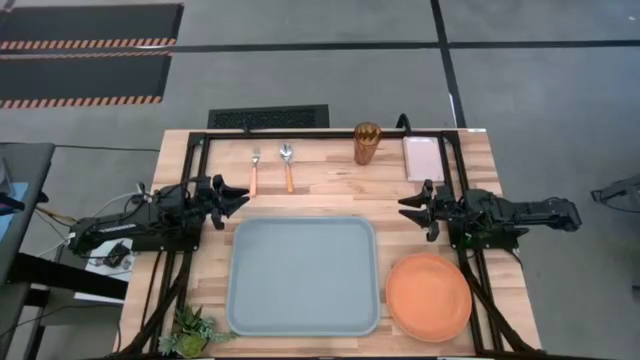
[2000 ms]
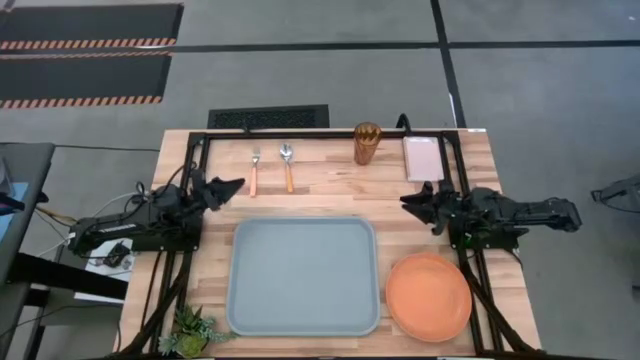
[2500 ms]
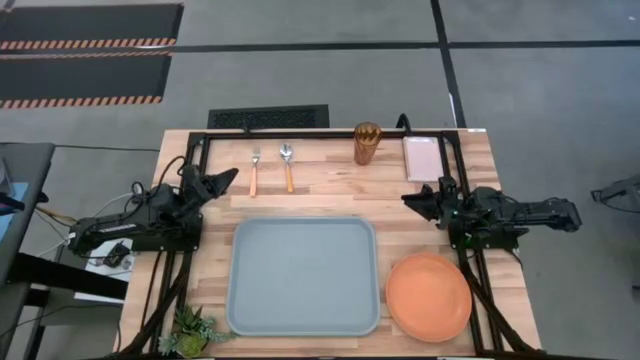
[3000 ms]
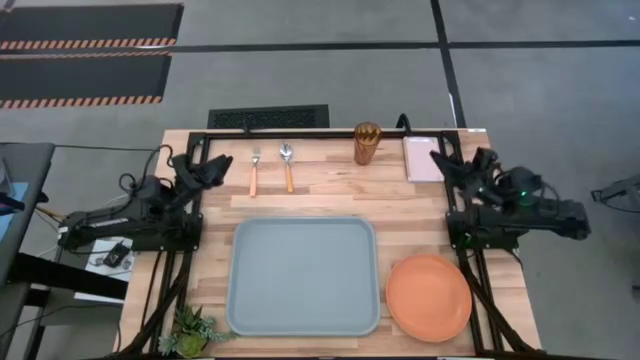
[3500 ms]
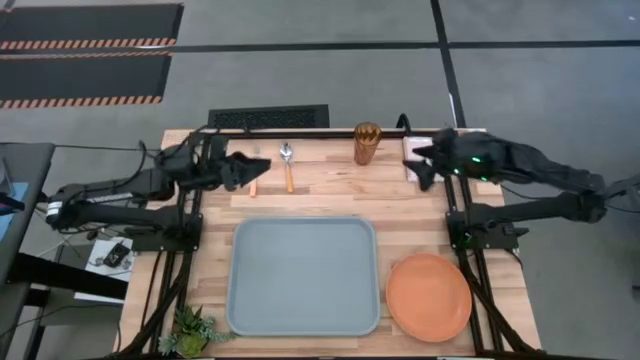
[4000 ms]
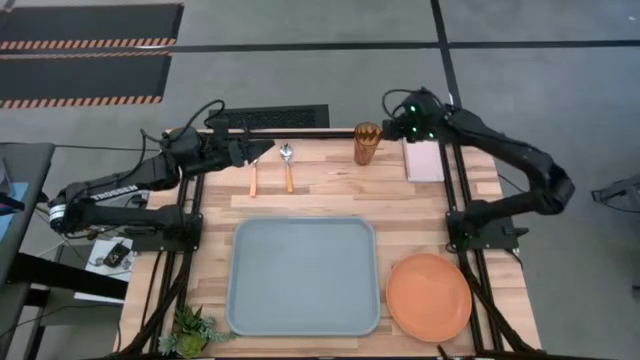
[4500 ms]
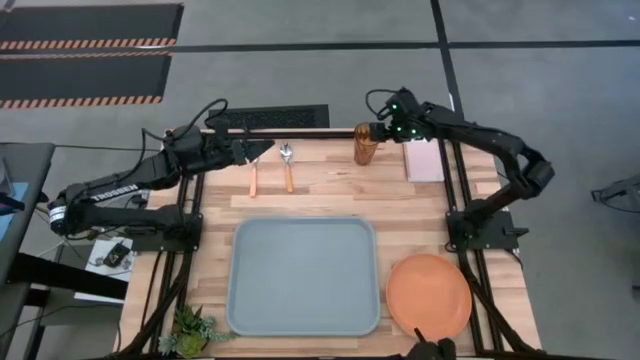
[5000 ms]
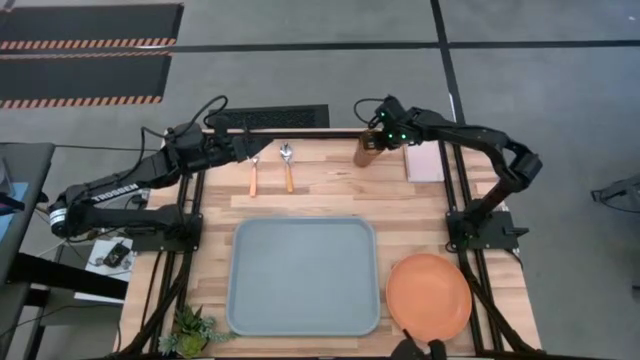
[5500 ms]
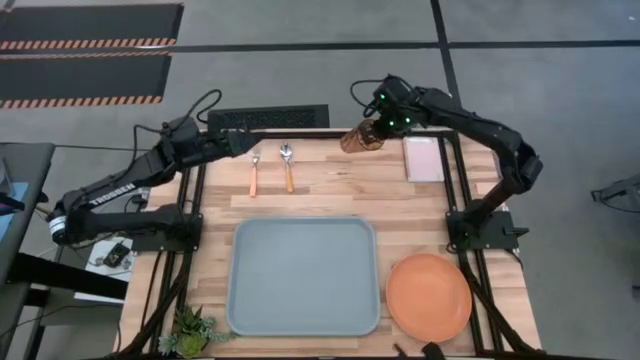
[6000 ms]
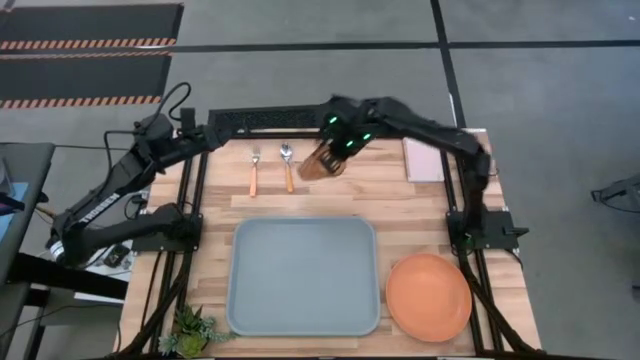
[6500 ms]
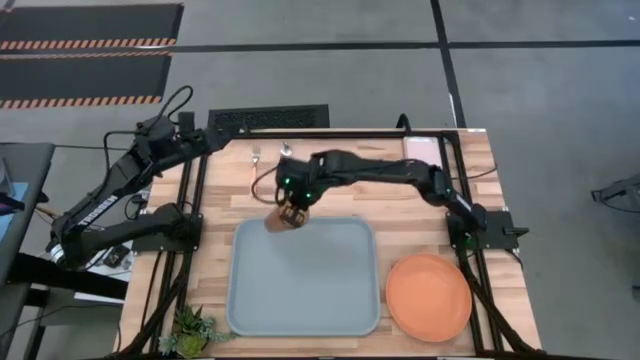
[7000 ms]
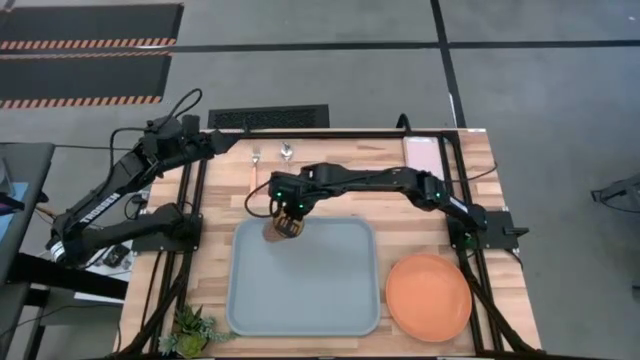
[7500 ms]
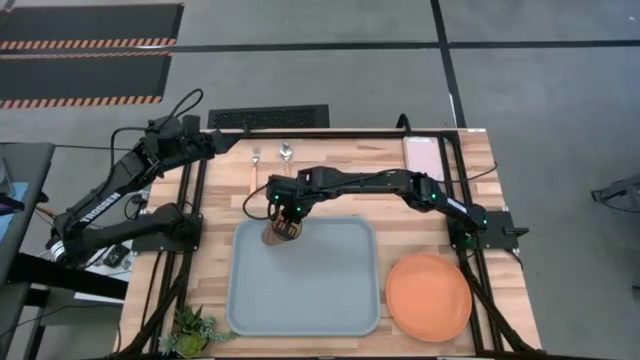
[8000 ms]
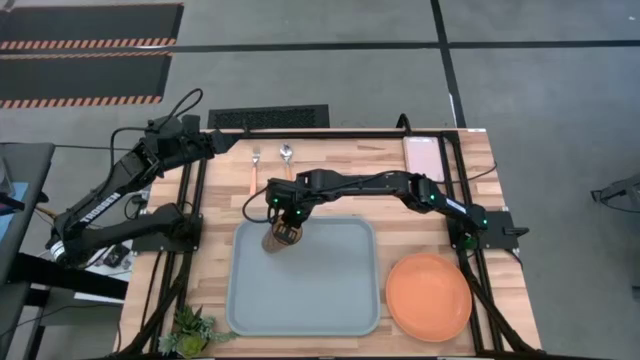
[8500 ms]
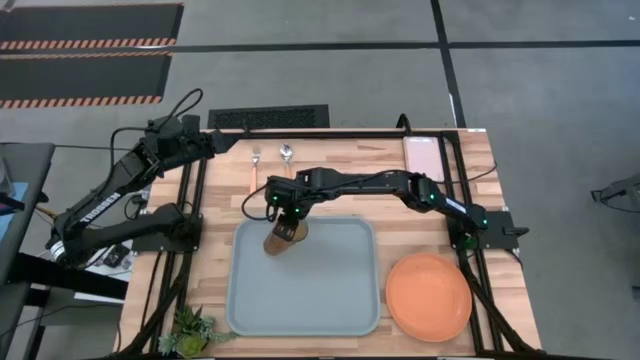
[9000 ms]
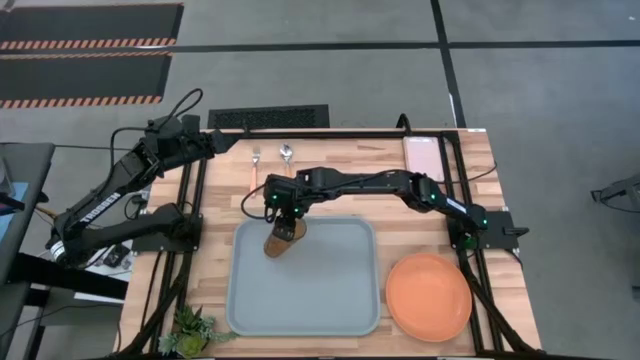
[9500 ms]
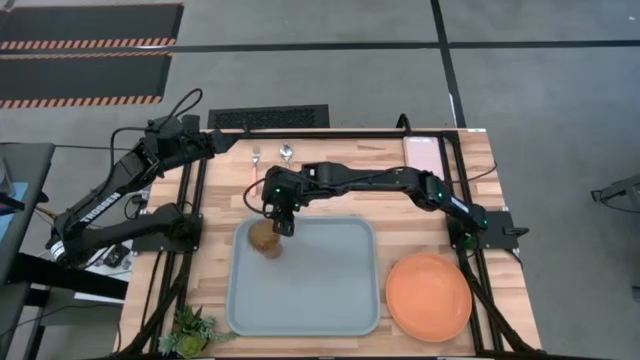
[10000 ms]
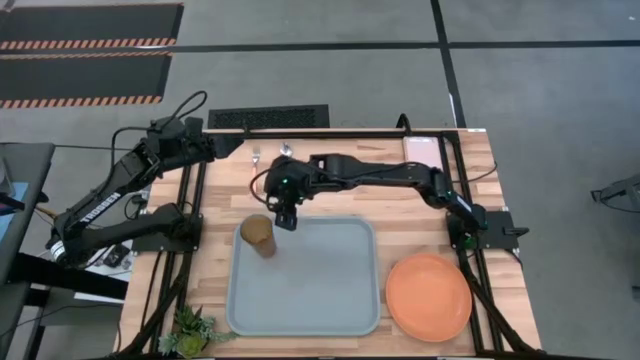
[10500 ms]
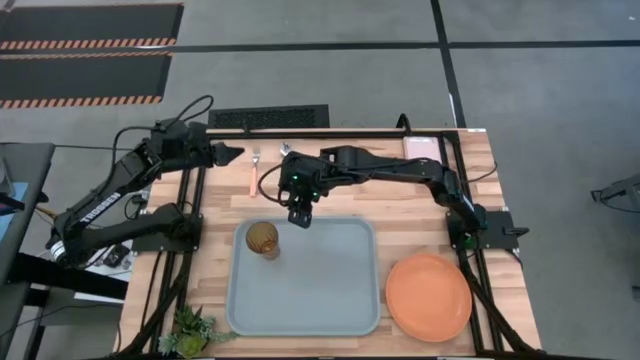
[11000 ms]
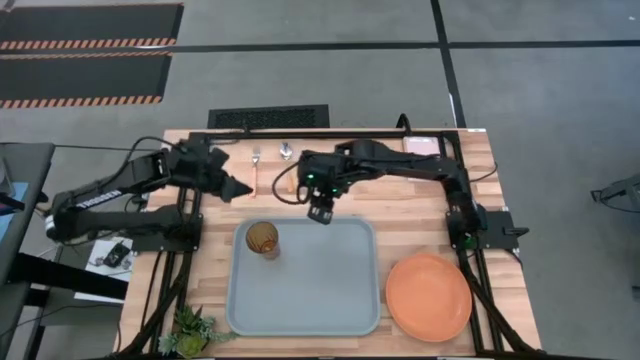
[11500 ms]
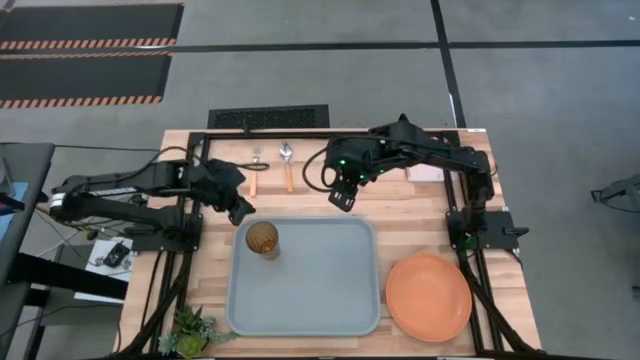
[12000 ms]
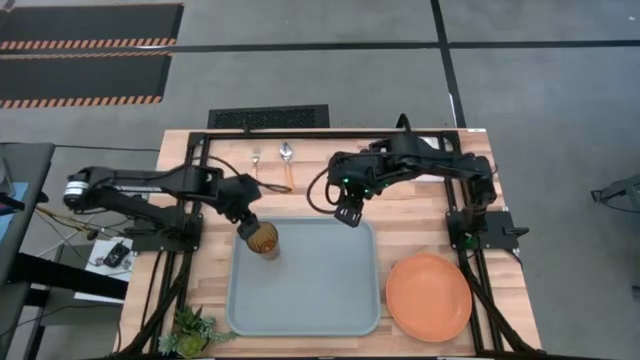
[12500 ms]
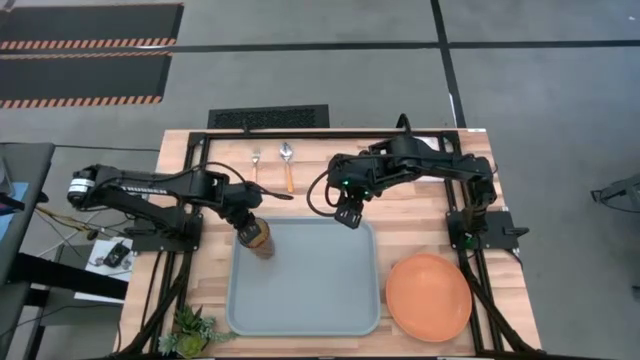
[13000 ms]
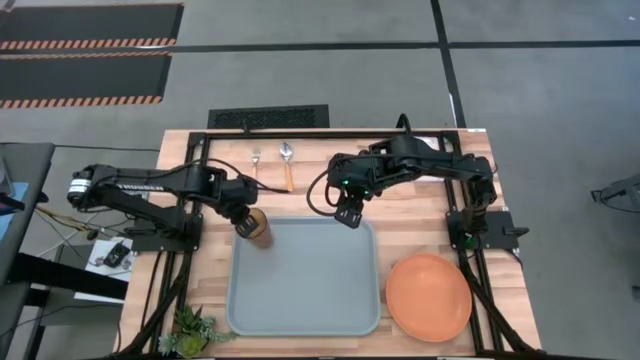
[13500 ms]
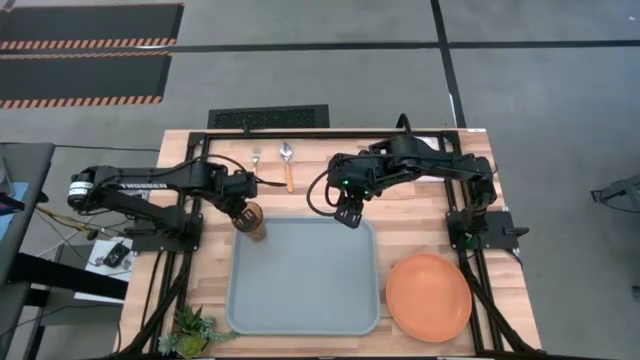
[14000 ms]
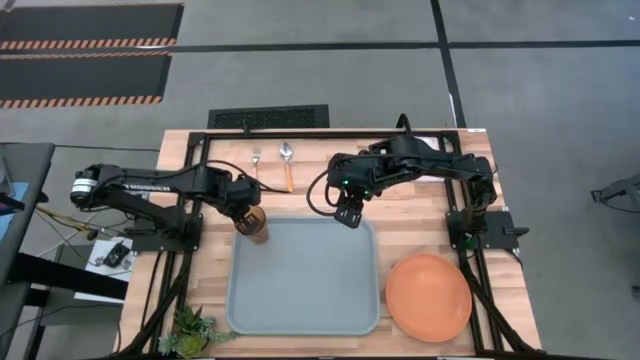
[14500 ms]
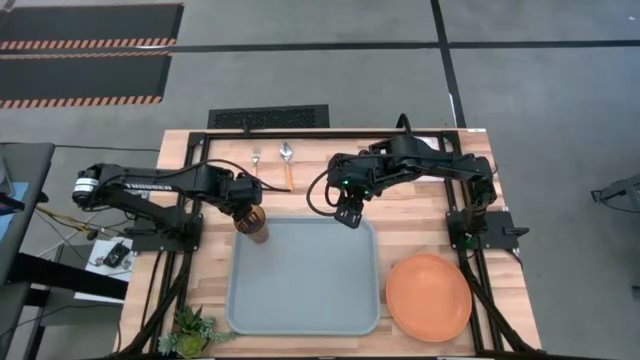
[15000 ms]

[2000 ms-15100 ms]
Task: Pick and place plate/cup/fork/spoon on tray
Put the brown glass on the top left of the gray serving tray

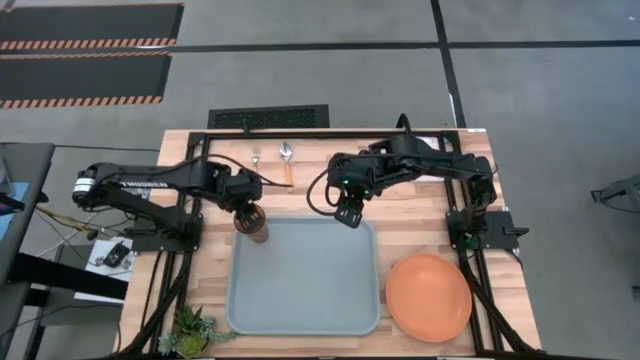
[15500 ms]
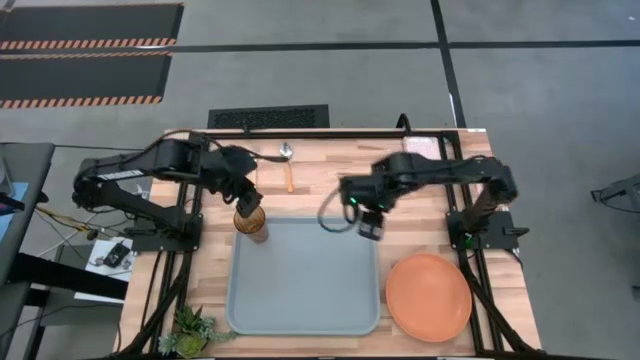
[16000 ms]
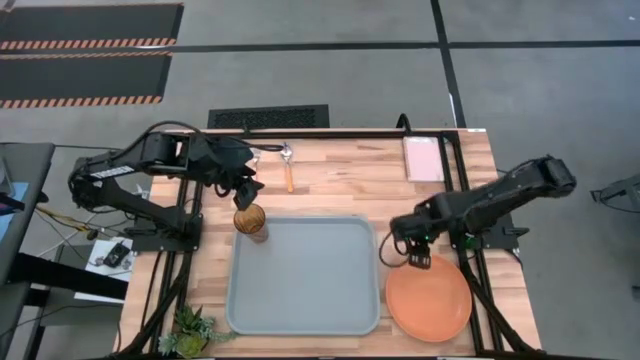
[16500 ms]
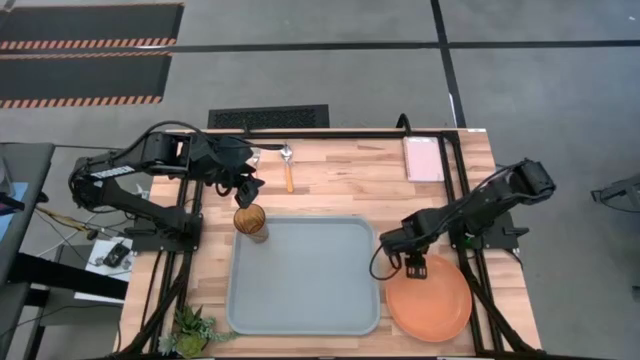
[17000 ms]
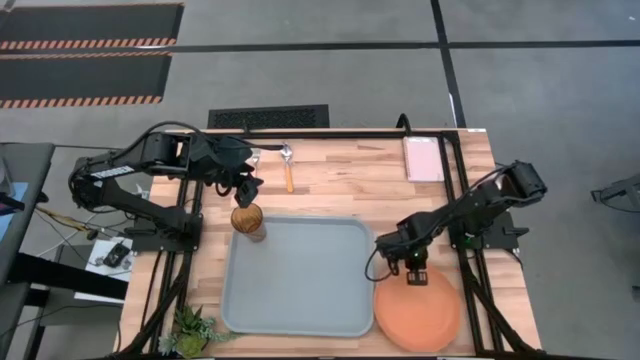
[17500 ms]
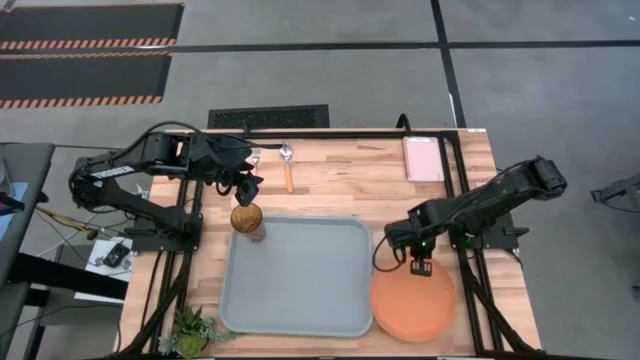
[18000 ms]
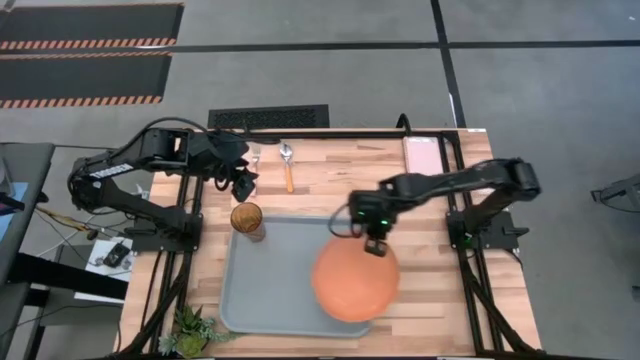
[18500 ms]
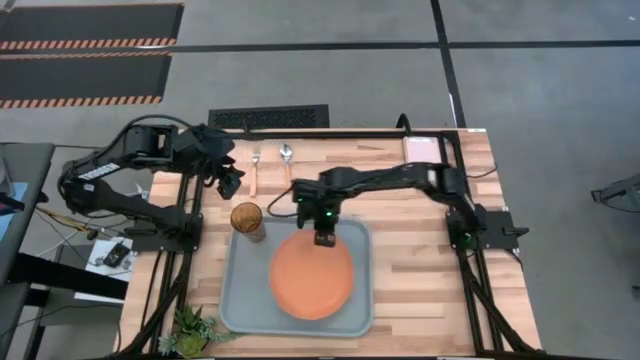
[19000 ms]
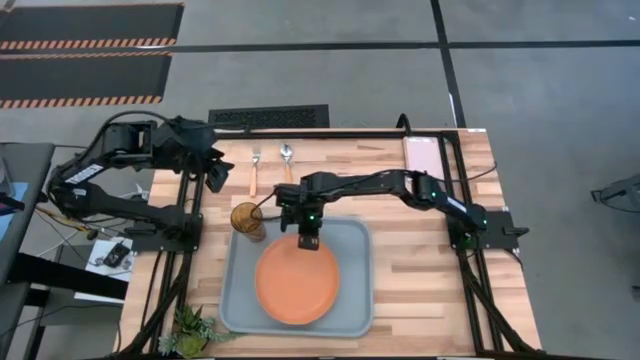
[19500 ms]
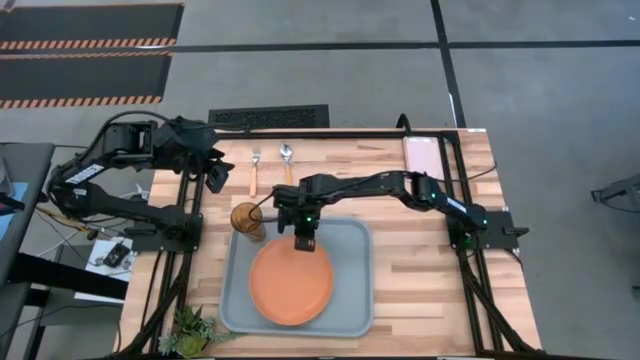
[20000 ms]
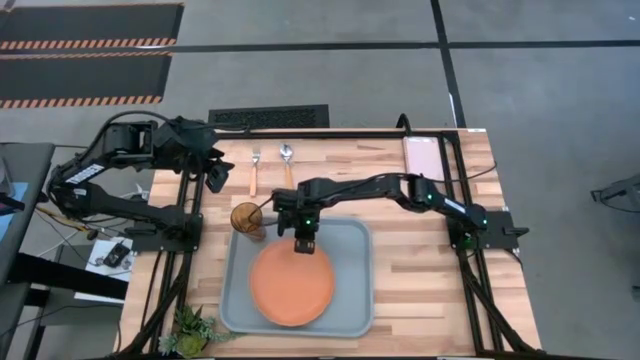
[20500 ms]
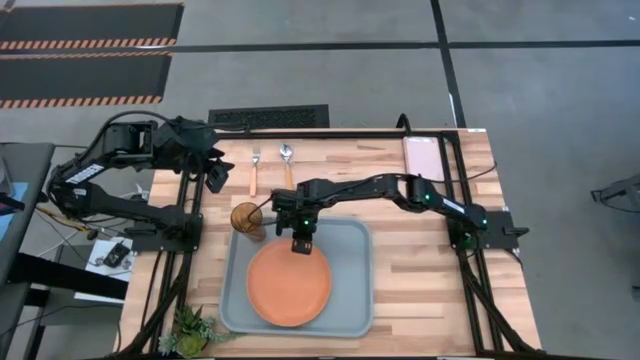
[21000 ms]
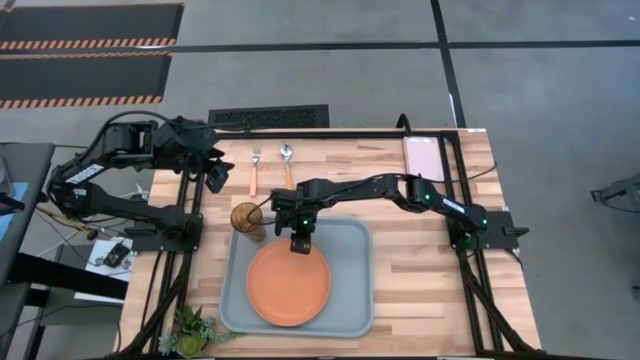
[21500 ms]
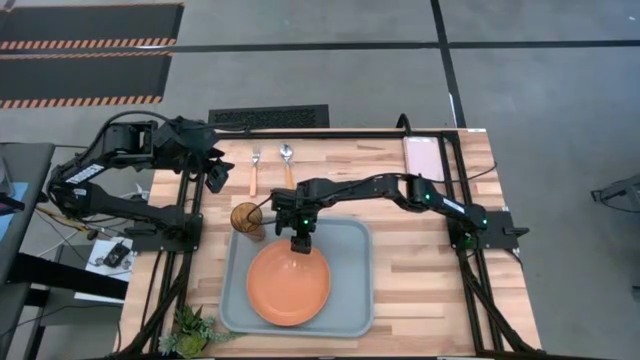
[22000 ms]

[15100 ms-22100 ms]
Put the orange plate on the gray serving tray to the bottom right of the brown glass
